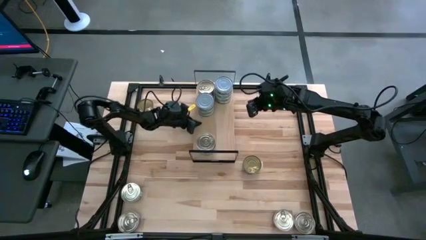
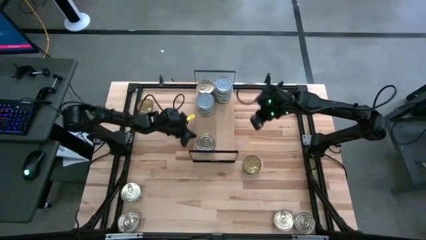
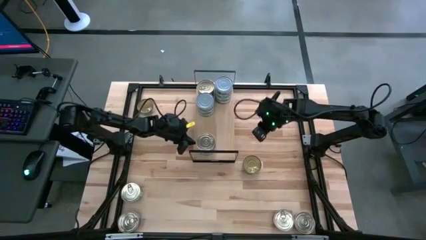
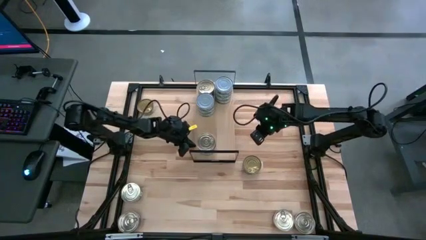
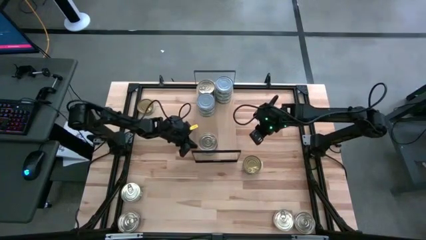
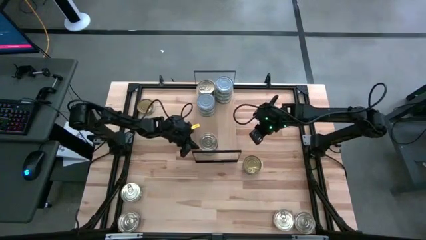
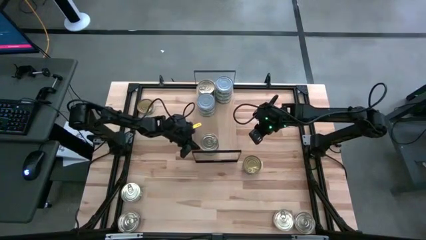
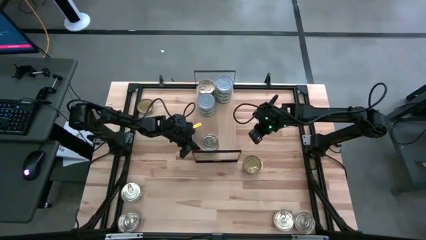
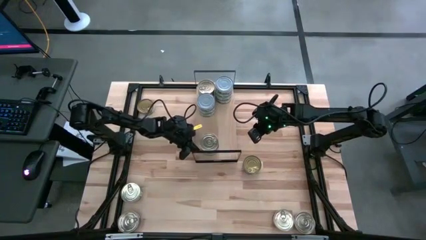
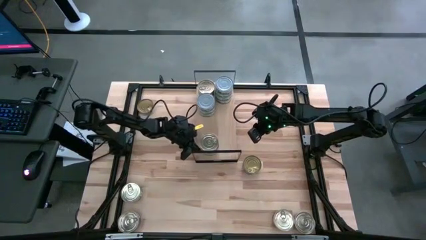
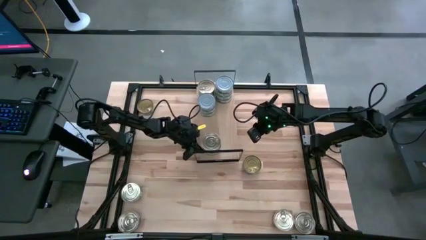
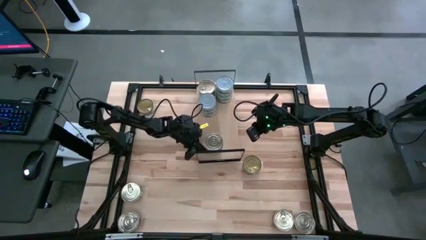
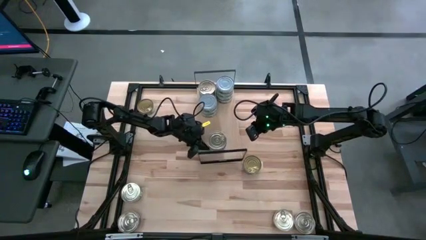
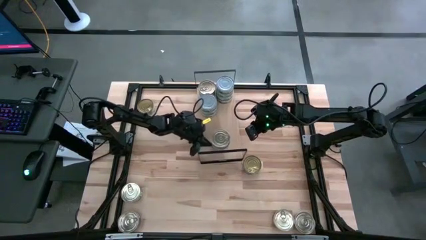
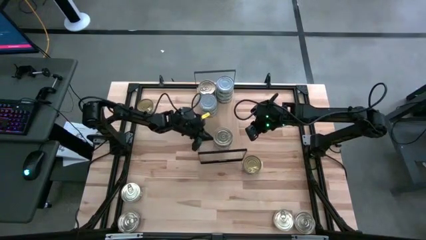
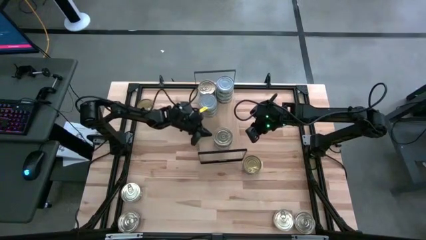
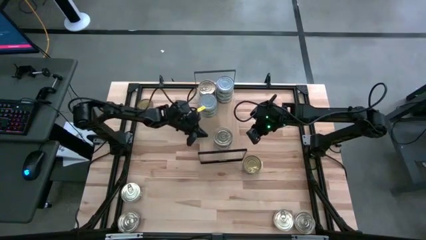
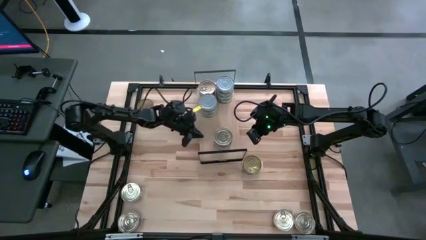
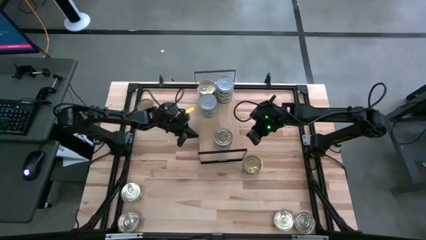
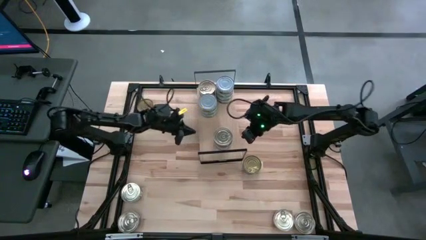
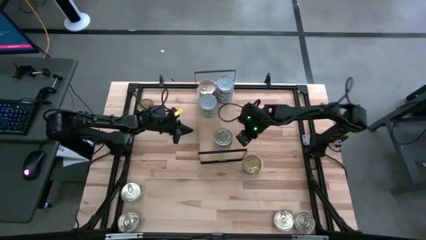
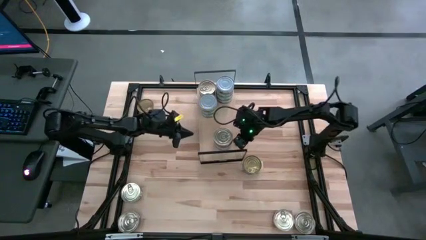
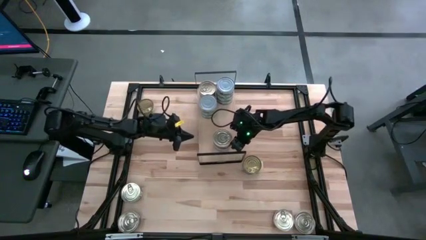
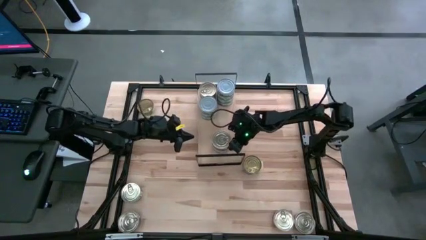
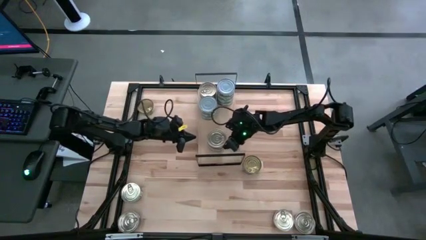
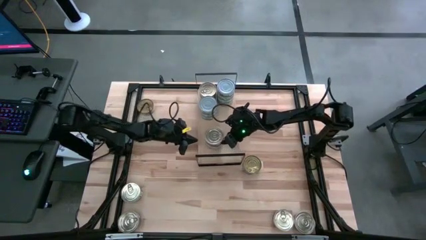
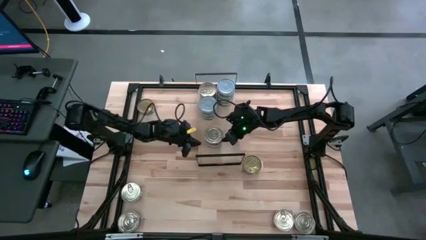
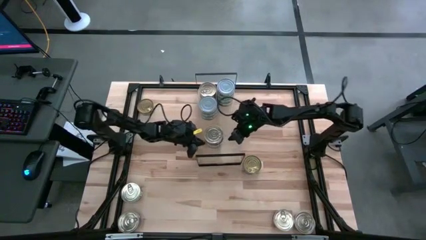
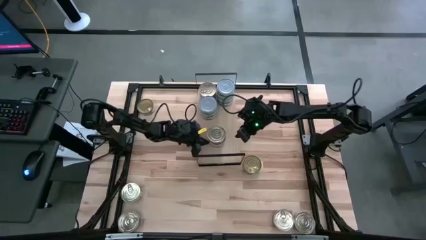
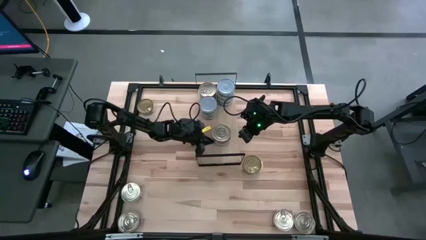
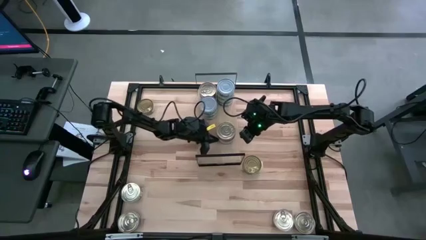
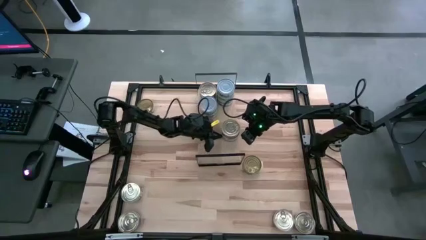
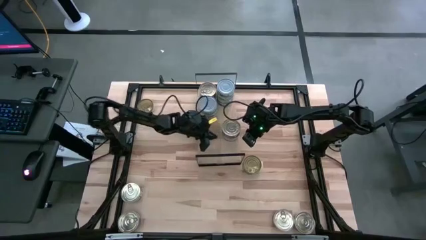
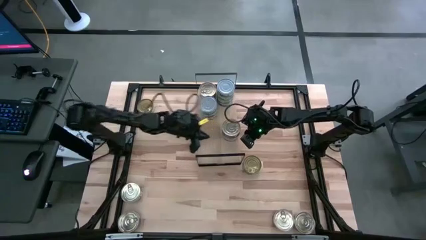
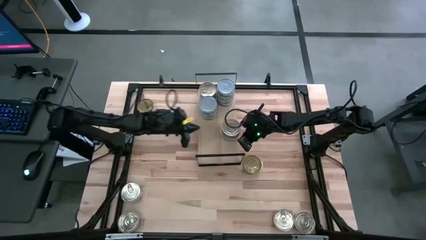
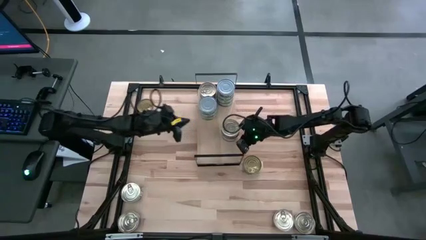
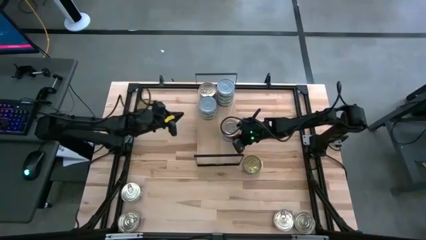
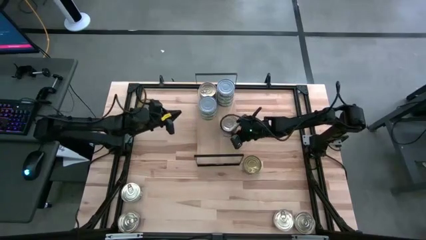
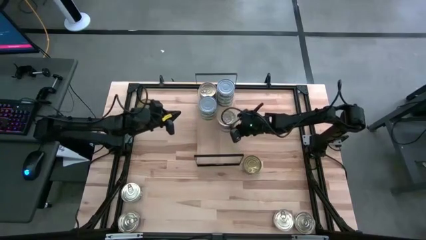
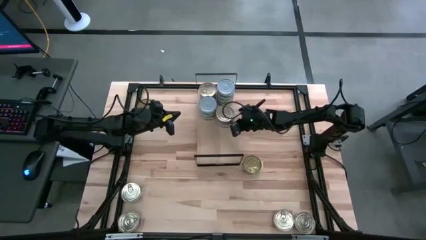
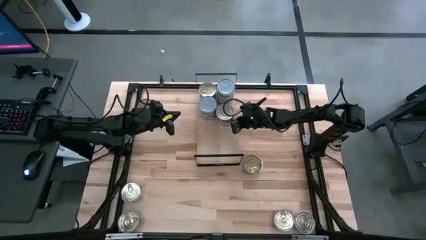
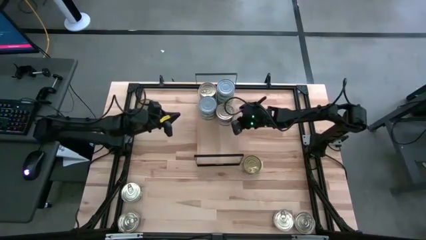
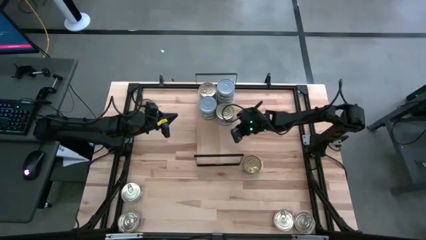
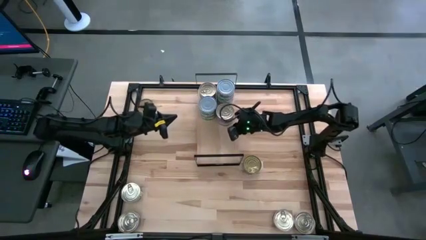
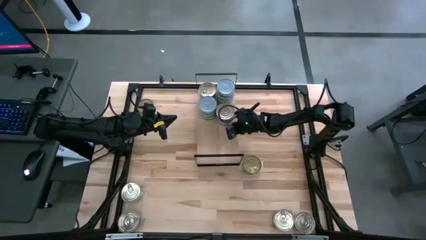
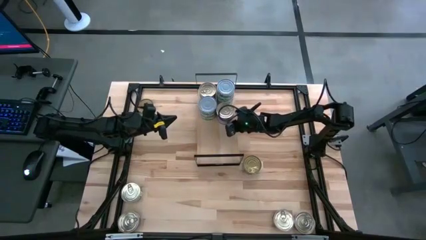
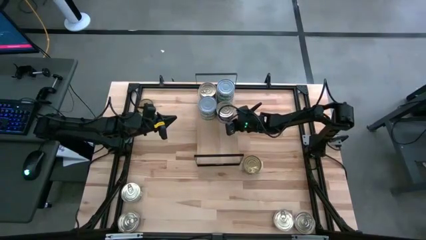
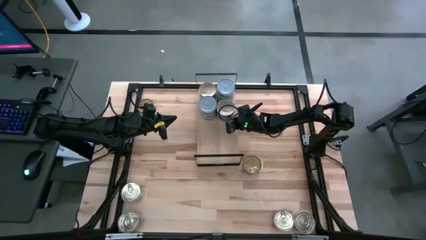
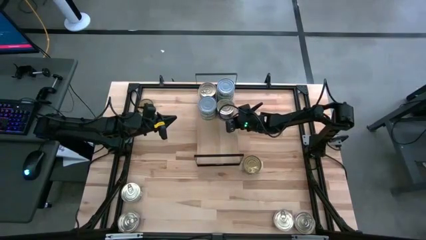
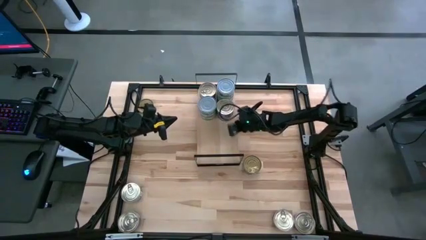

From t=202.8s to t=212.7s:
Task: Stack canned seafood by type on shelf
Adjust the pink and blue tuna can

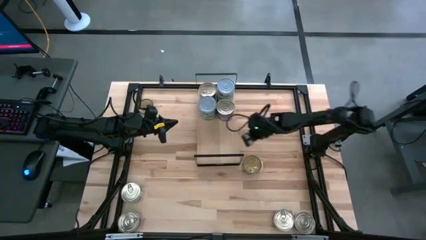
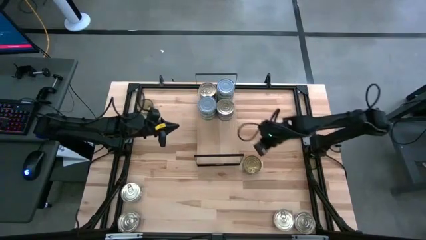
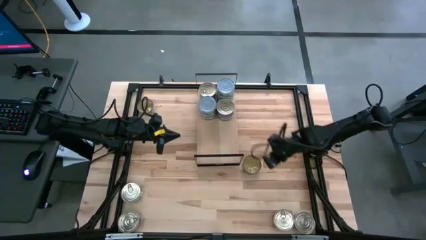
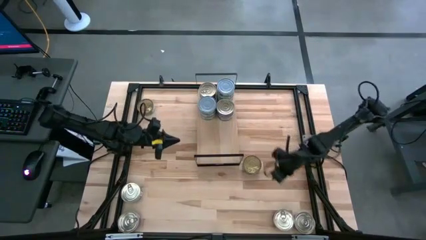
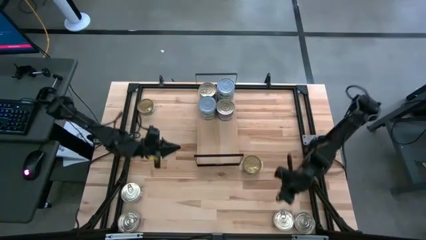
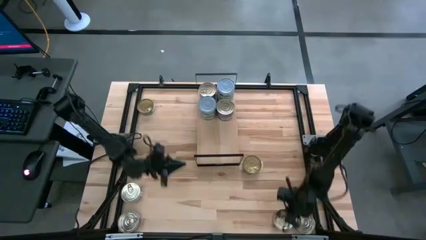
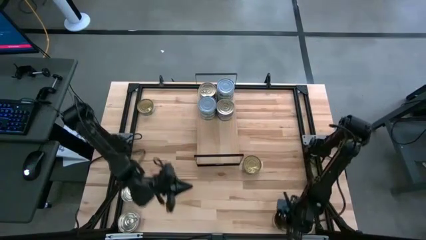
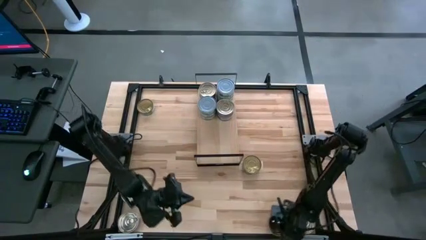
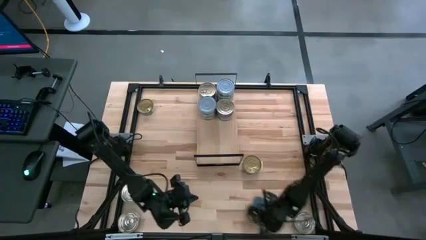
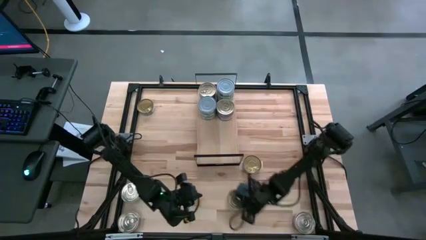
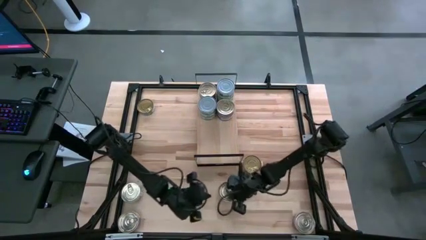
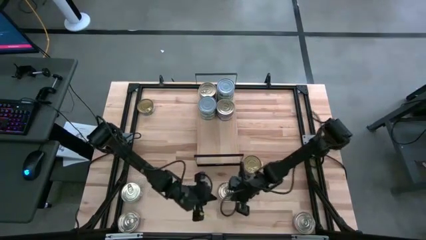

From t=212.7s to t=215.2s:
Move the pink and blue tuna can to the bottom middle of the table

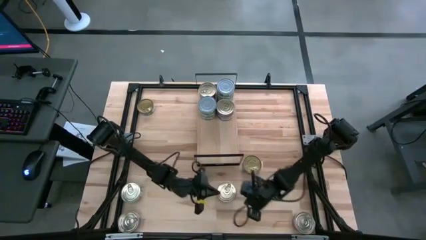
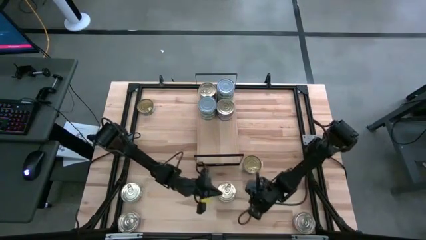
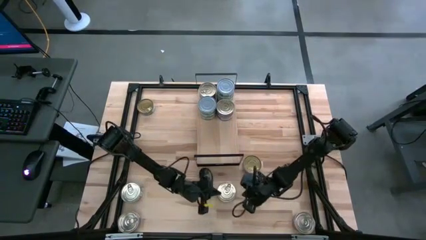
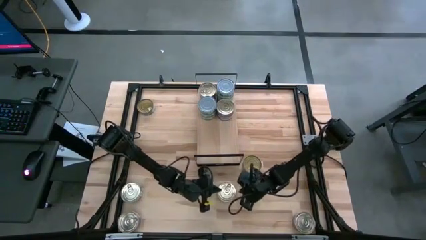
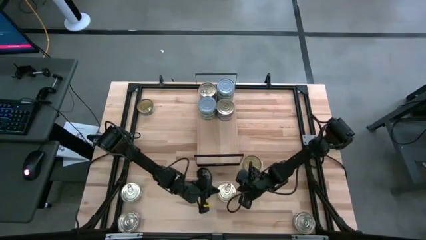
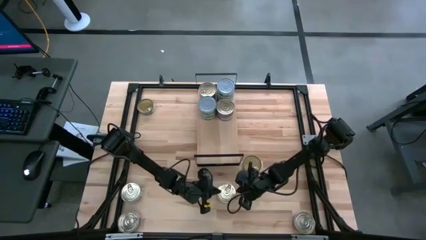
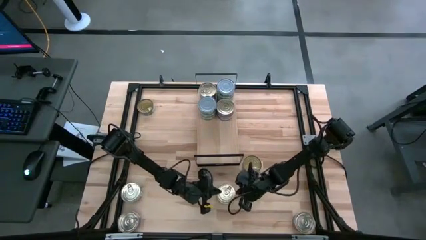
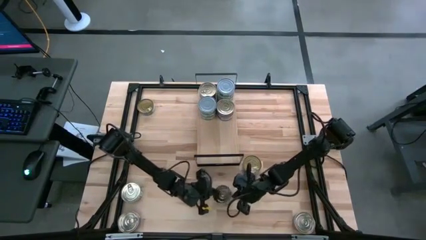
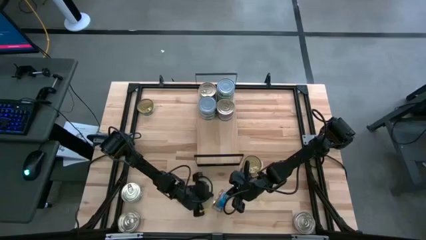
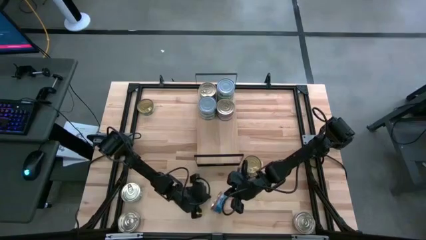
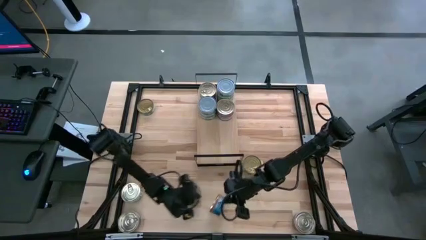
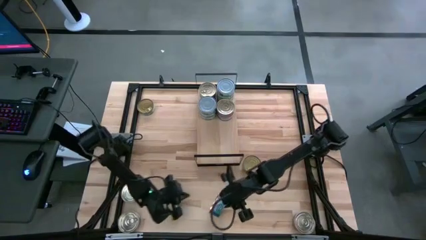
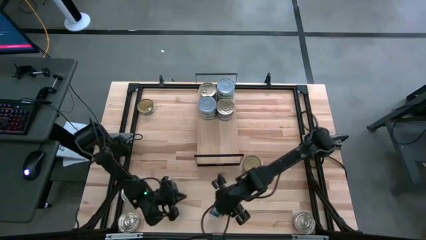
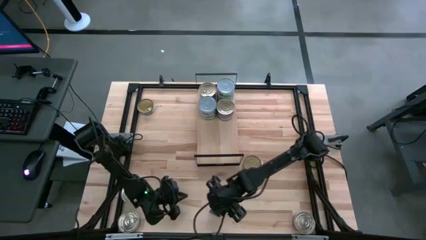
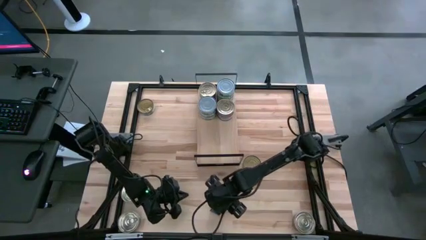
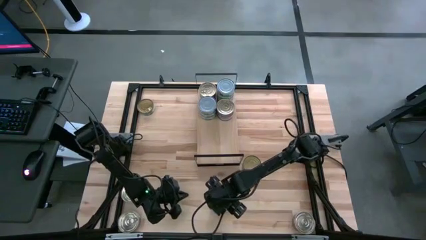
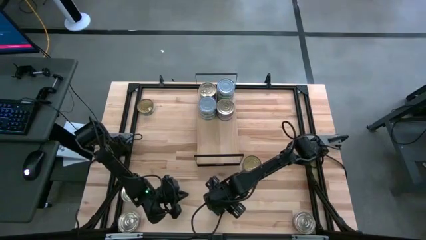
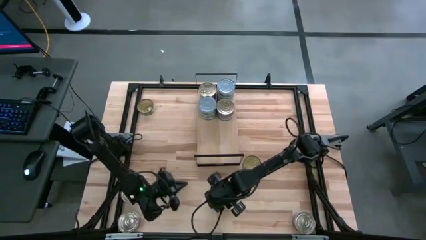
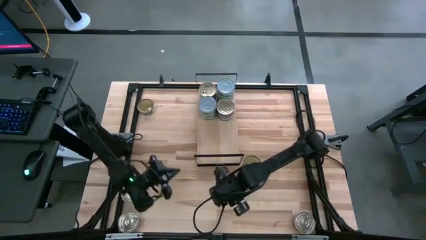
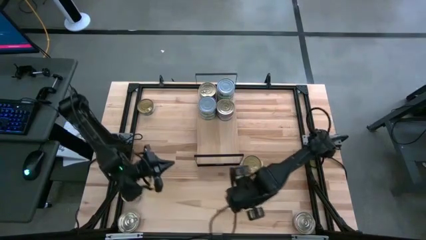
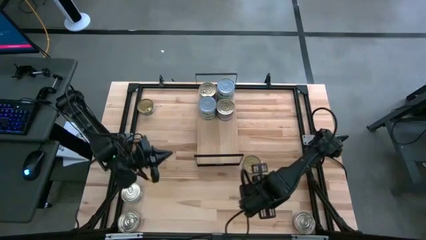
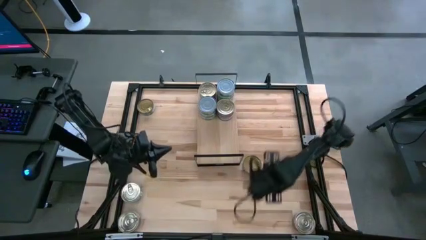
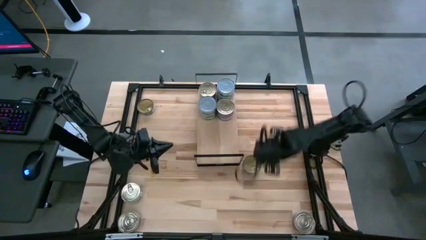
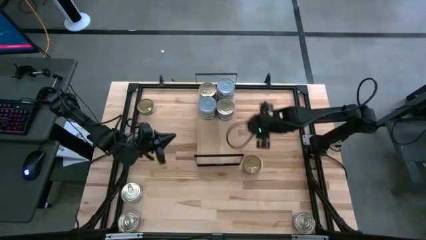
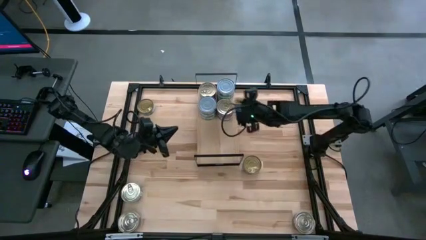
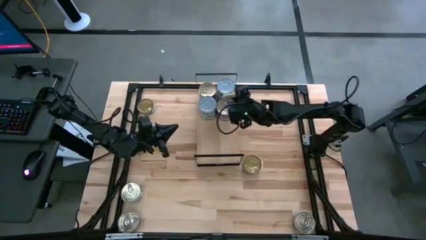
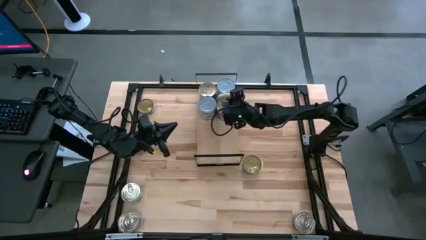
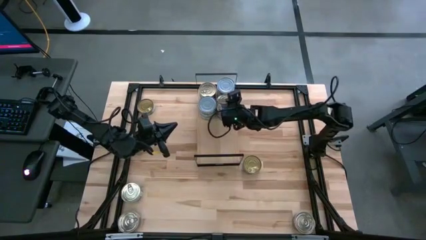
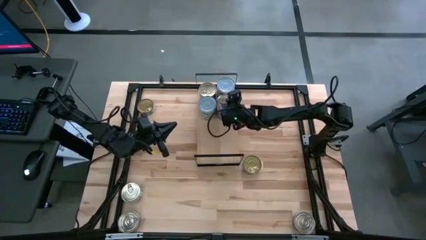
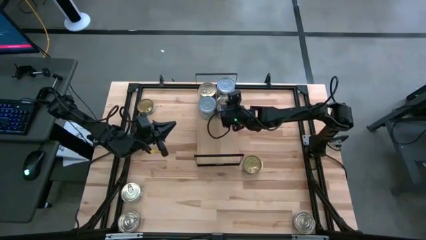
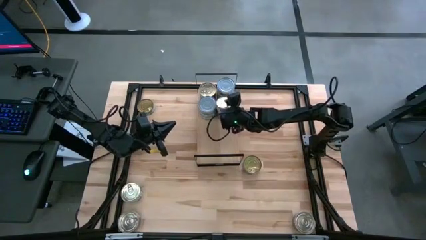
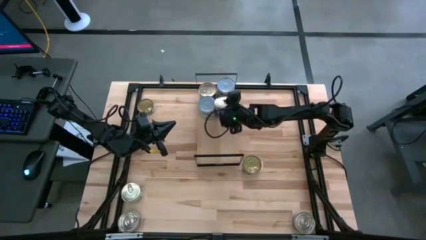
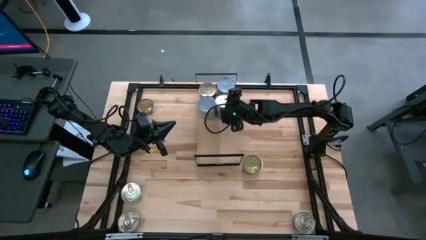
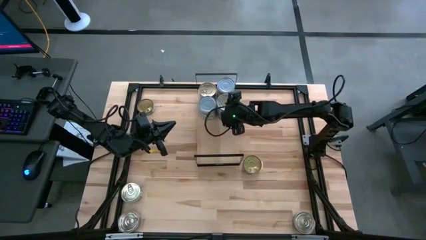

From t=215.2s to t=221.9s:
Stack the pink and blue tuna can on top of the pink and blue tuna can on the shelf
